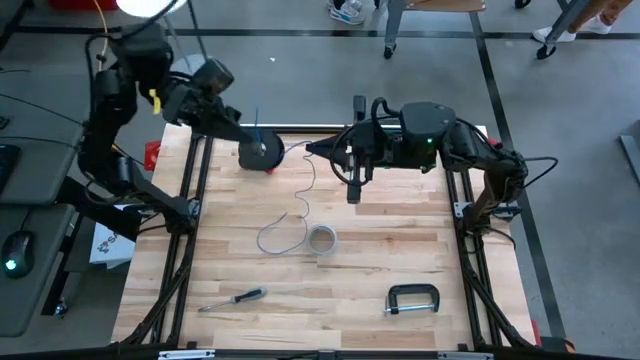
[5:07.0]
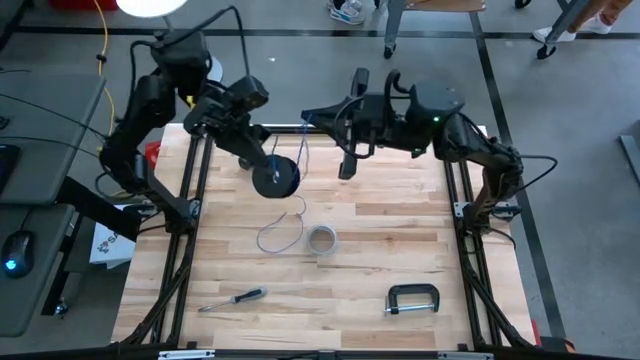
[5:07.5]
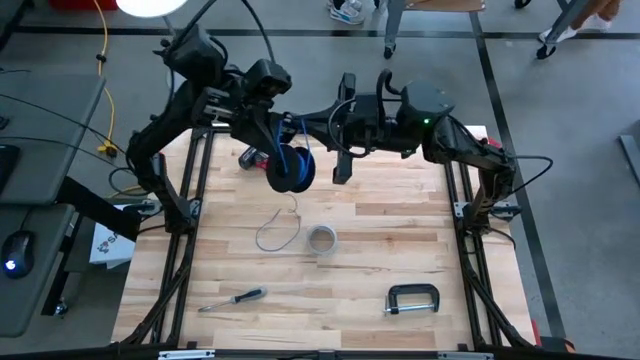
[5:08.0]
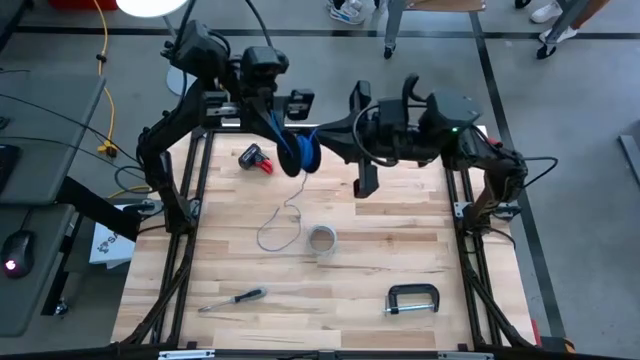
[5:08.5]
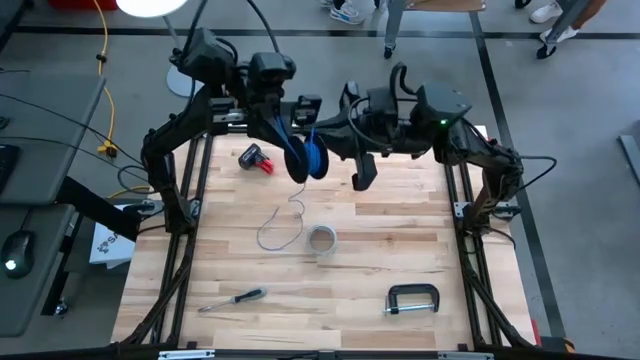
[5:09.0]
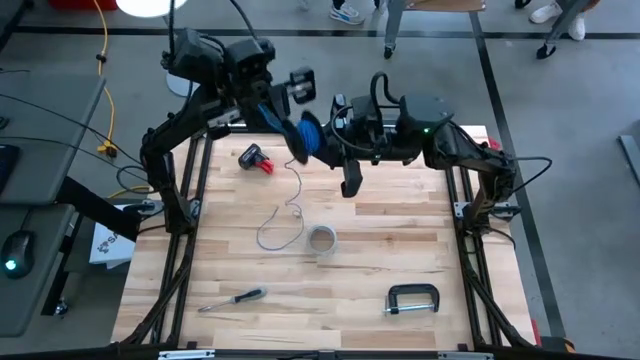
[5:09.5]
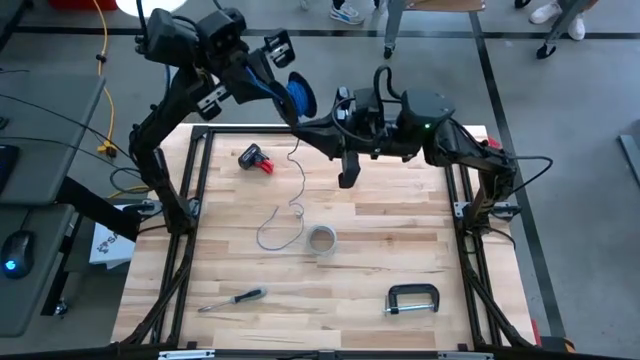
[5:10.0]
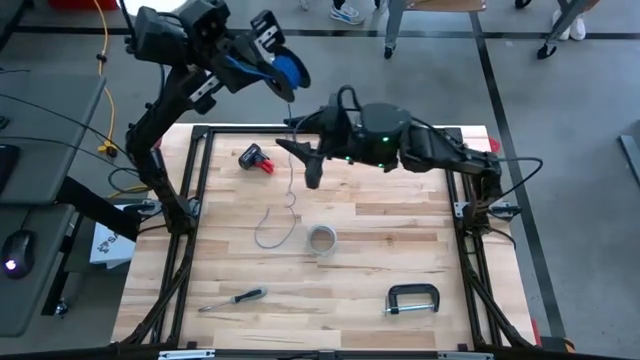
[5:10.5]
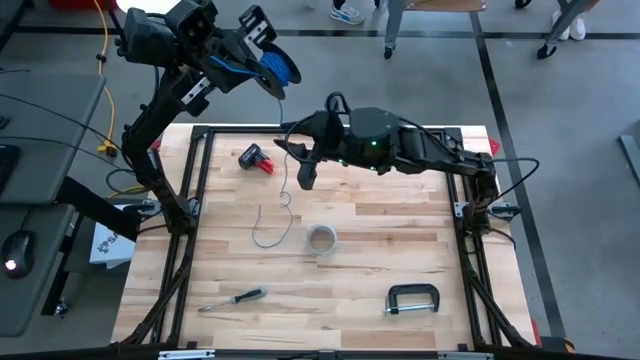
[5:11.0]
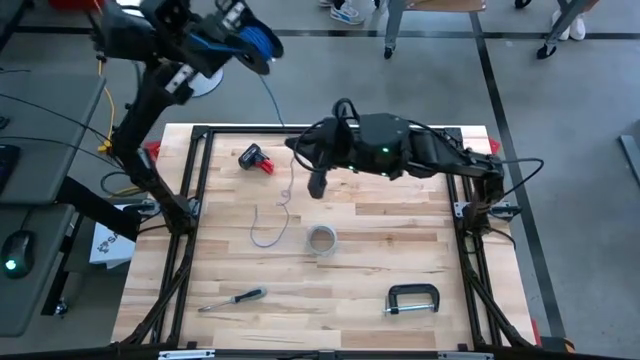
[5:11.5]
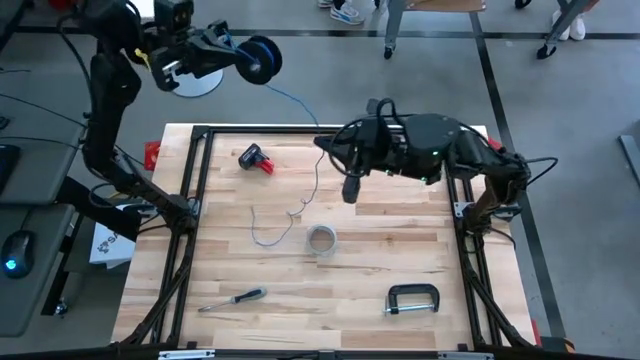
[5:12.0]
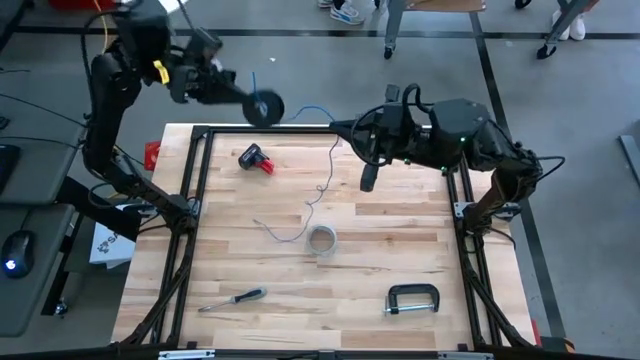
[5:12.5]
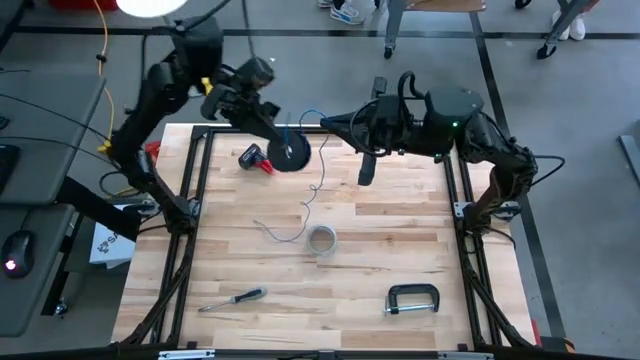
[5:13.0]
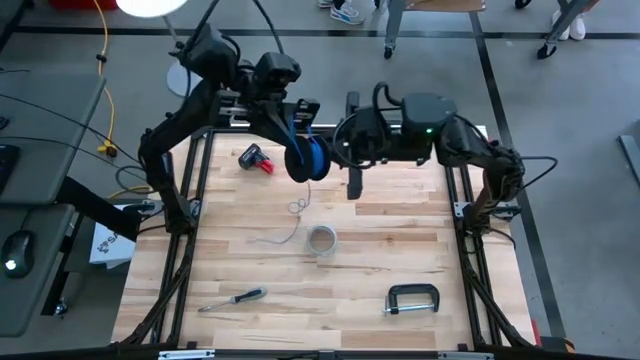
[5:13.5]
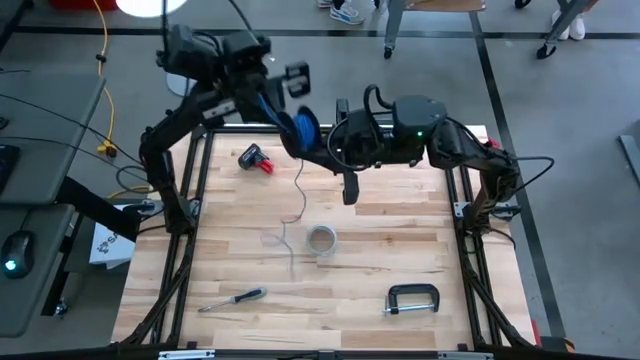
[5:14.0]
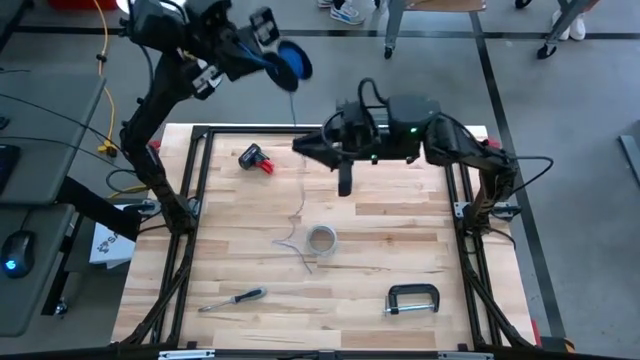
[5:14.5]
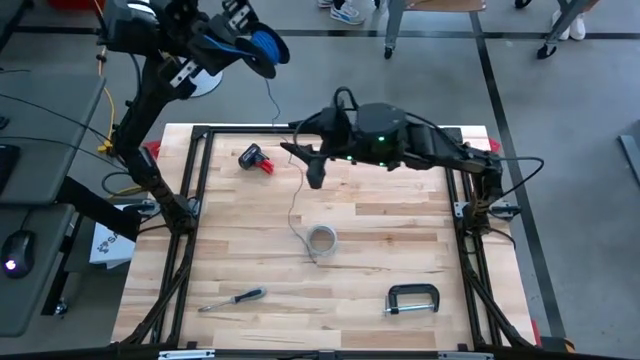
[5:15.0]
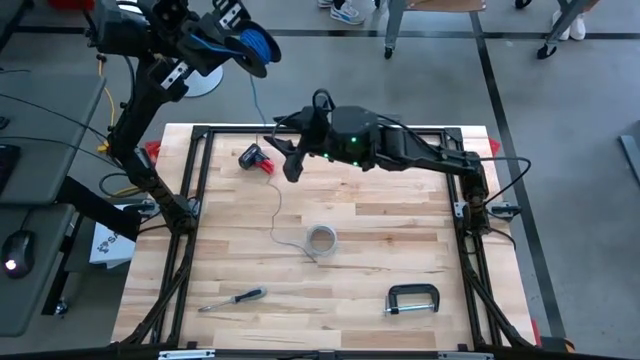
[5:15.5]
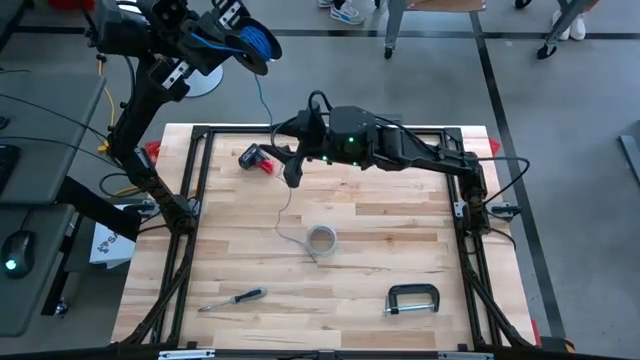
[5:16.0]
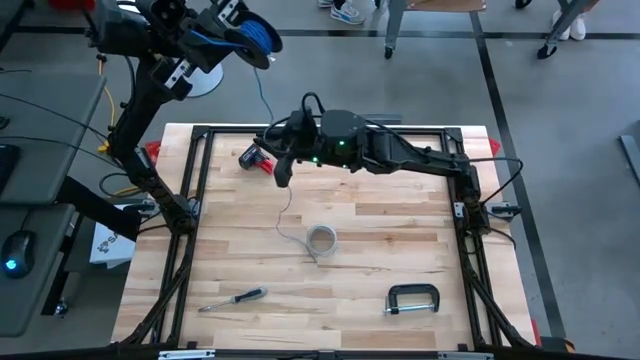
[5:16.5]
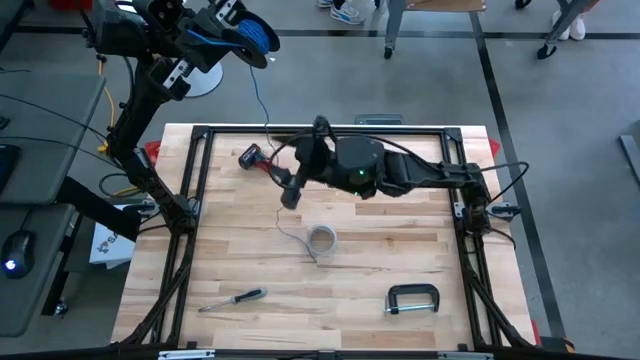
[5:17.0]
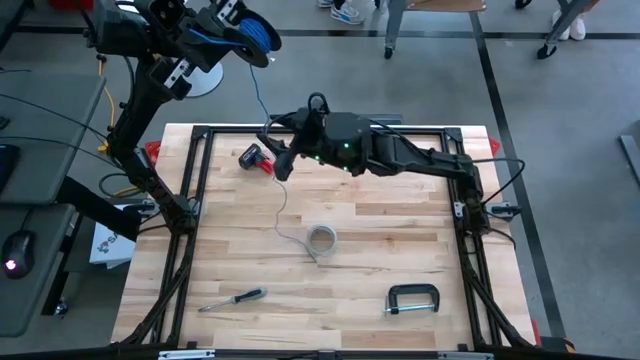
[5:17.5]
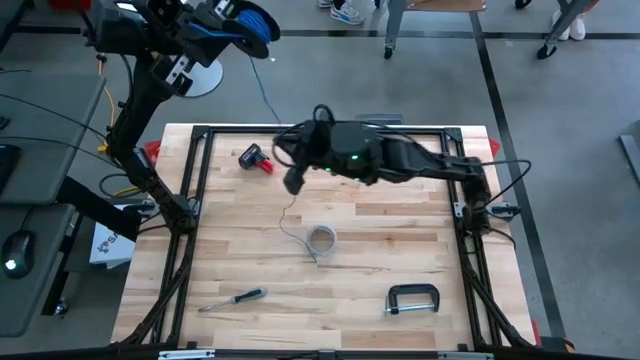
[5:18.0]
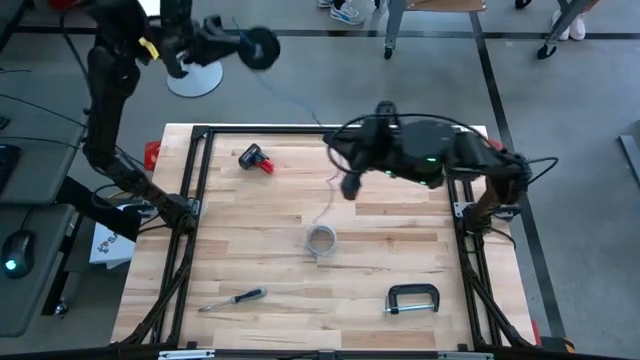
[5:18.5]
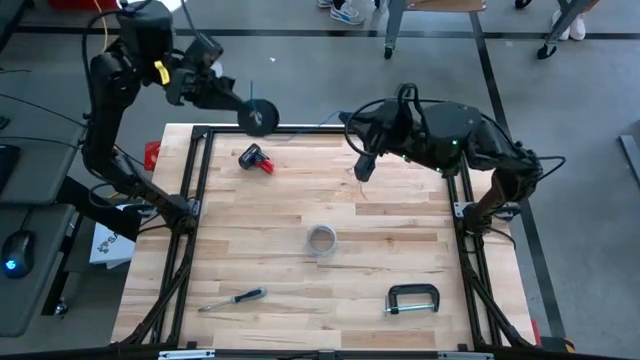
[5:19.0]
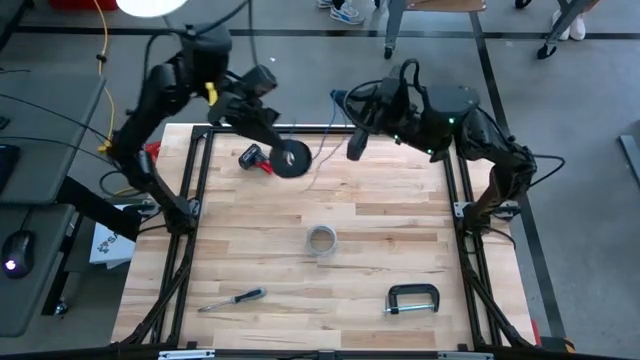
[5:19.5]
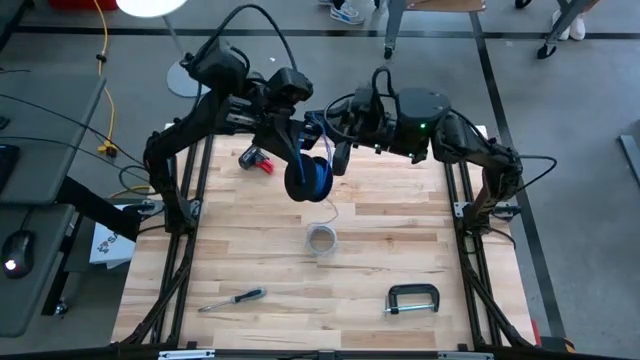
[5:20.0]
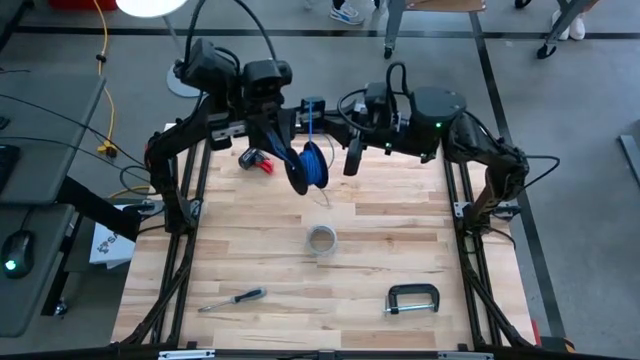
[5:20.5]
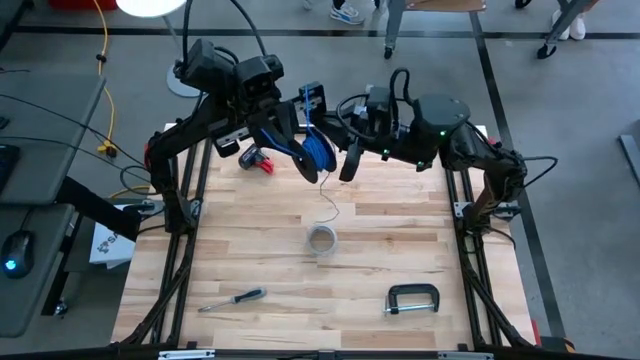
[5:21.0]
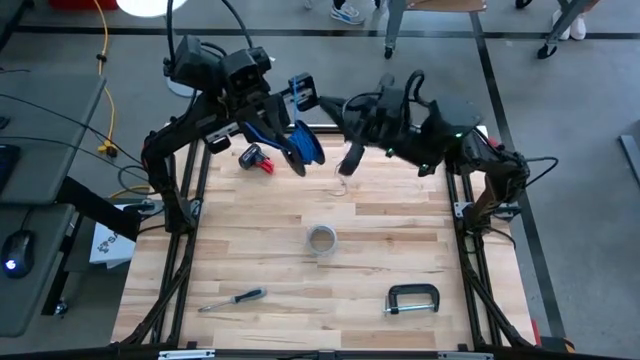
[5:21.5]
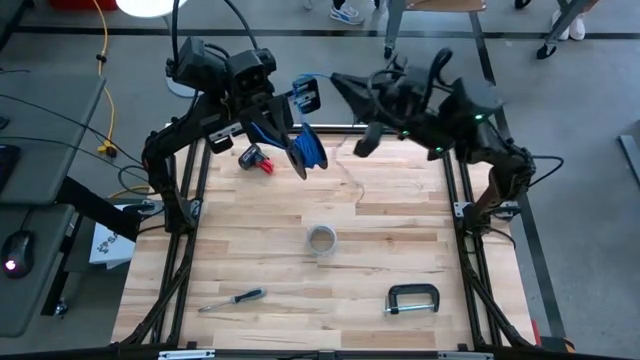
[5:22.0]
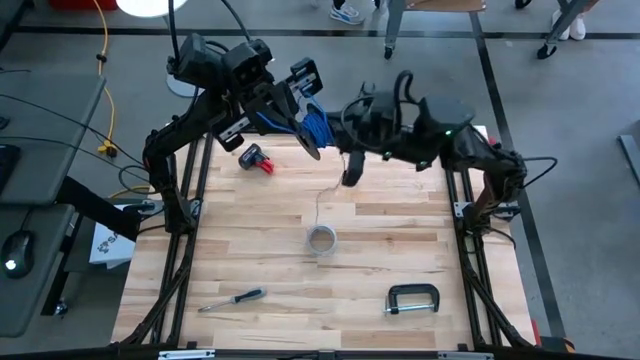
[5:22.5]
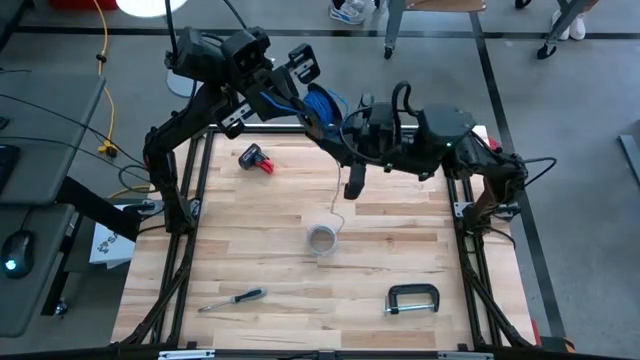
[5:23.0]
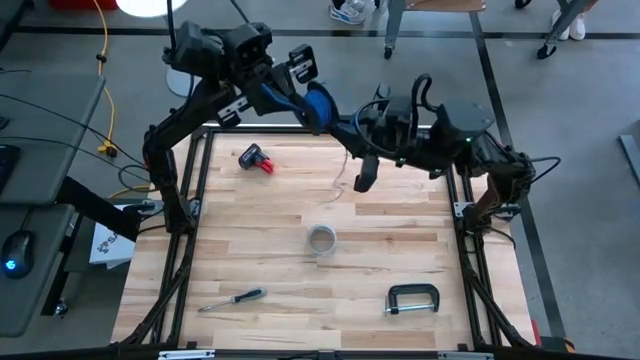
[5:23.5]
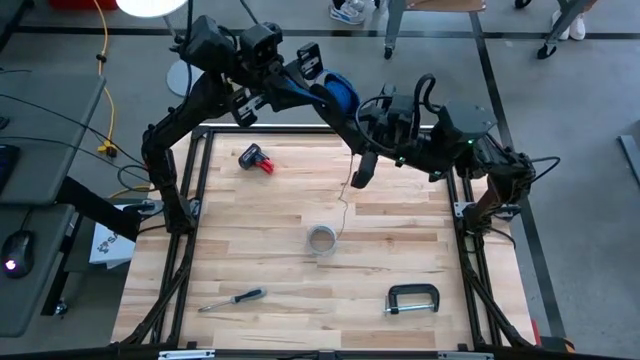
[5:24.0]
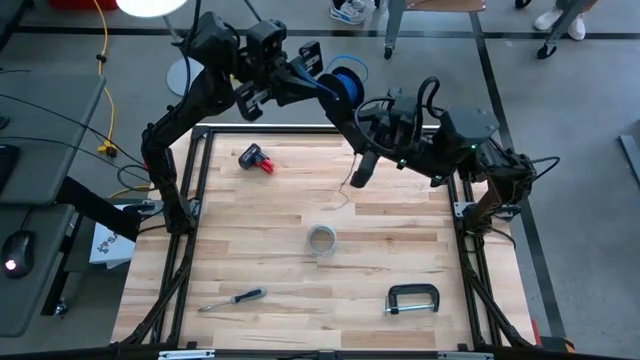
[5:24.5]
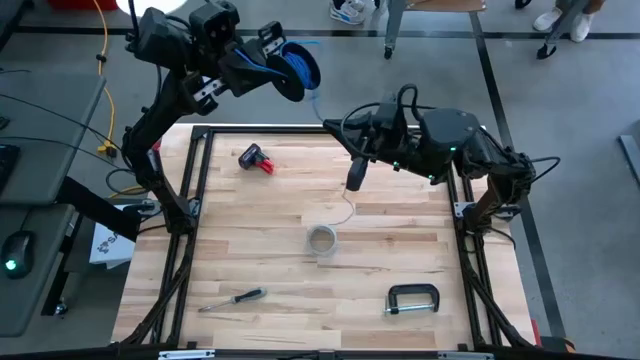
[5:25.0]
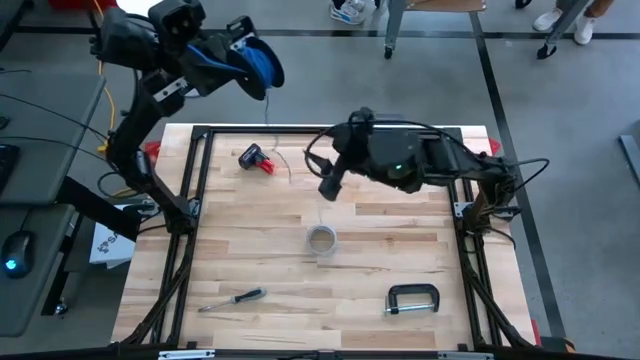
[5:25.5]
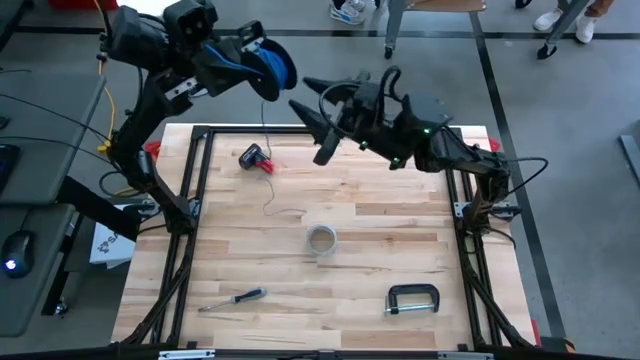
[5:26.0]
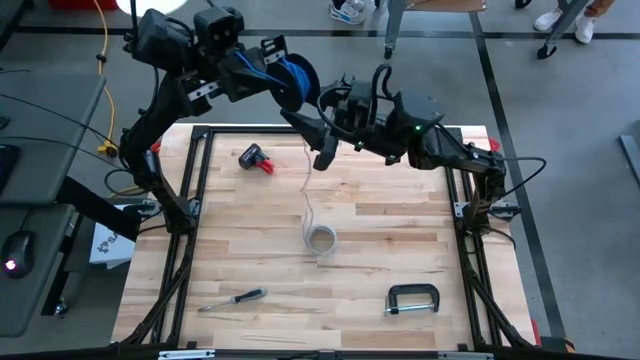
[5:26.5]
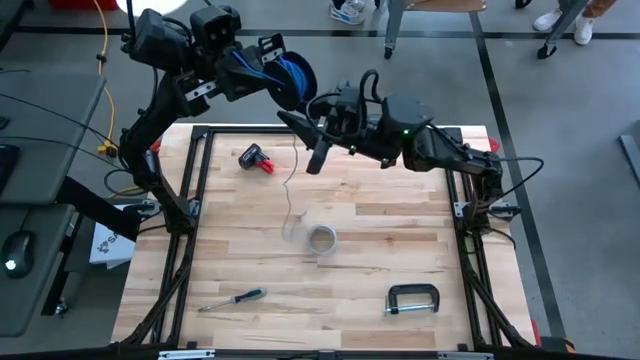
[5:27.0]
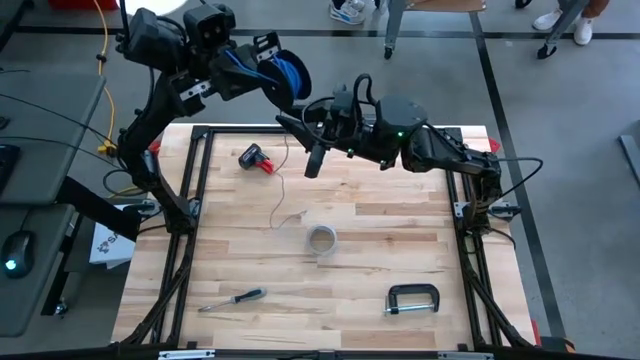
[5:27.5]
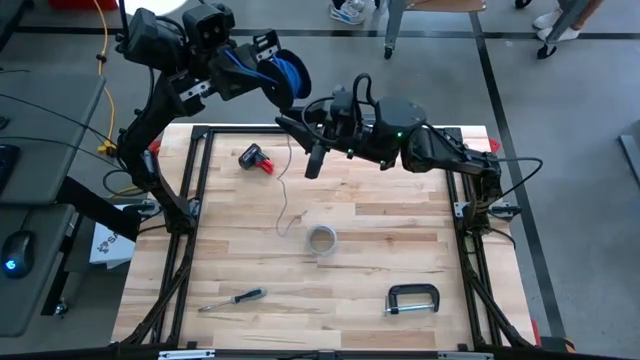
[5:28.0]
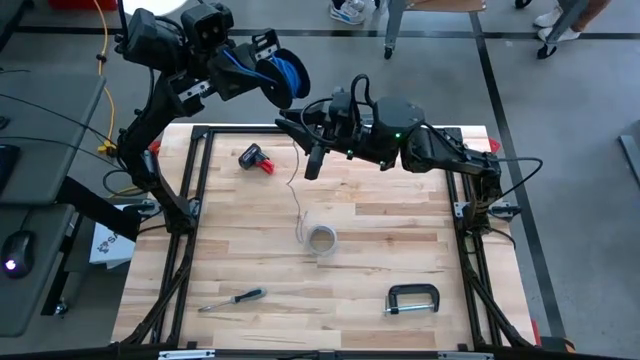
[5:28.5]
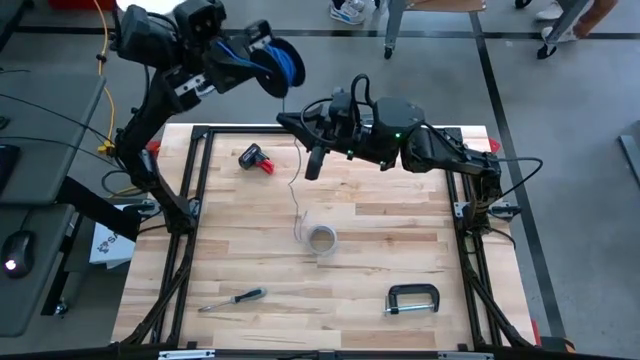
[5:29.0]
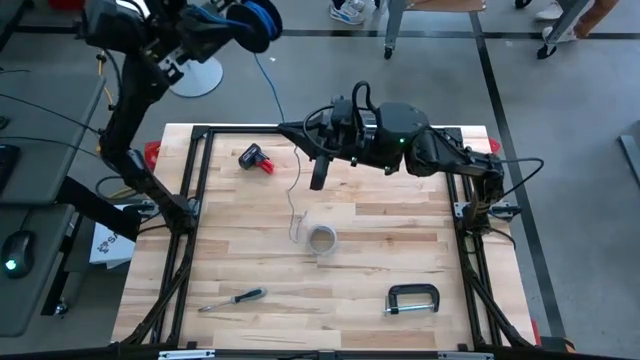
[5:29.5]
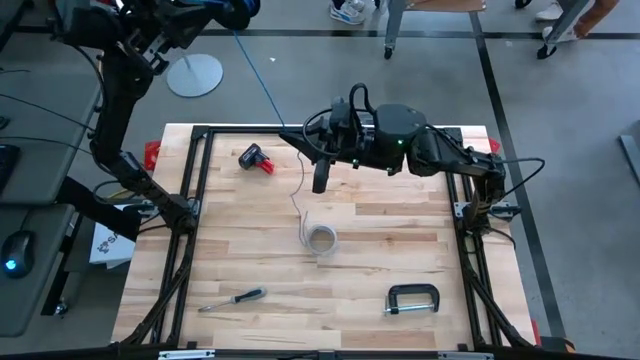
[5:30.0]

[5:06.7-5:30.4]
Task: Coil cords
Coil the blue wire on the spool
